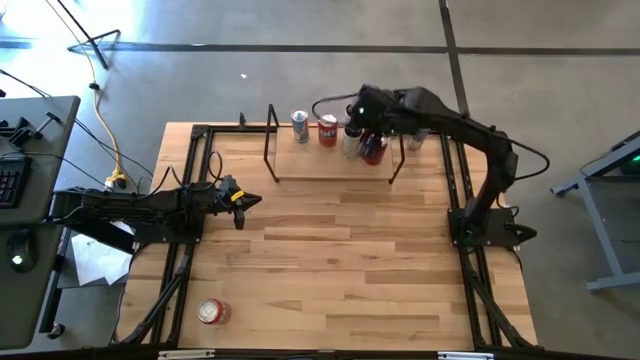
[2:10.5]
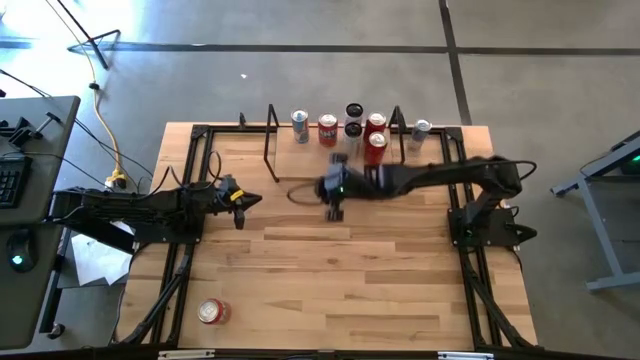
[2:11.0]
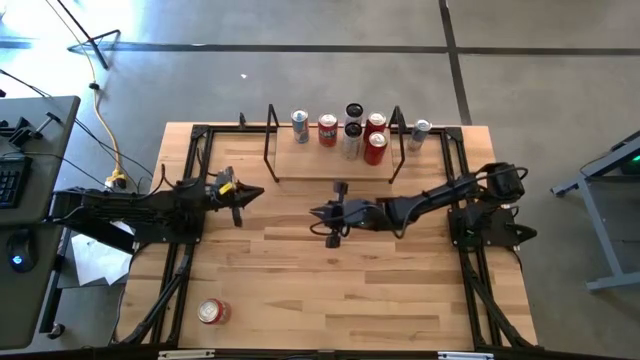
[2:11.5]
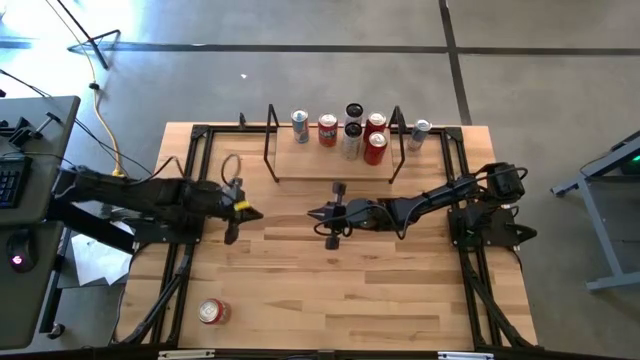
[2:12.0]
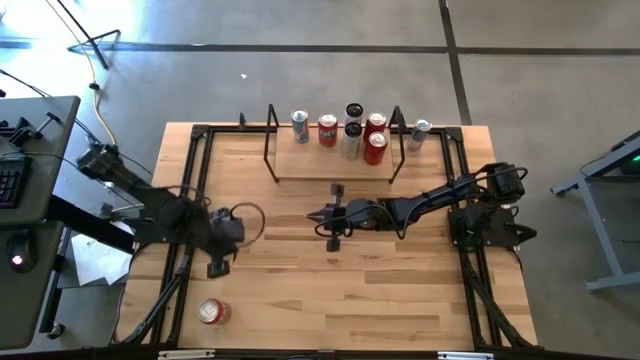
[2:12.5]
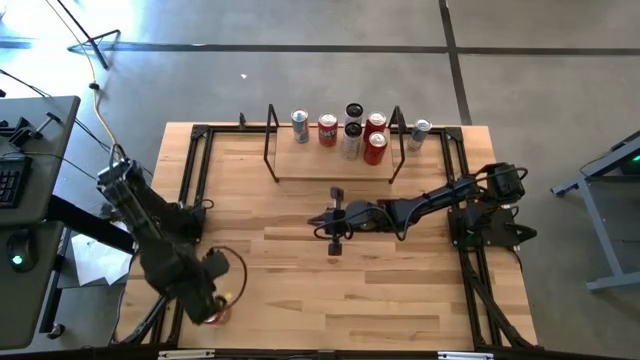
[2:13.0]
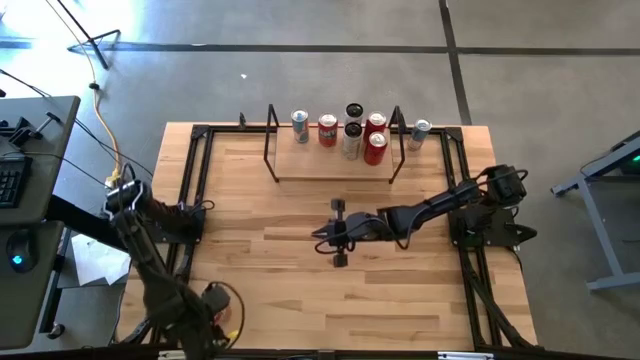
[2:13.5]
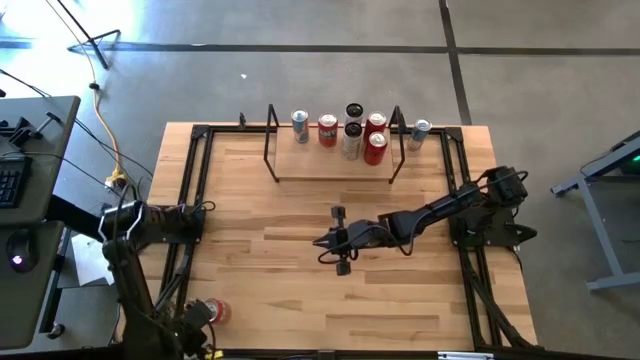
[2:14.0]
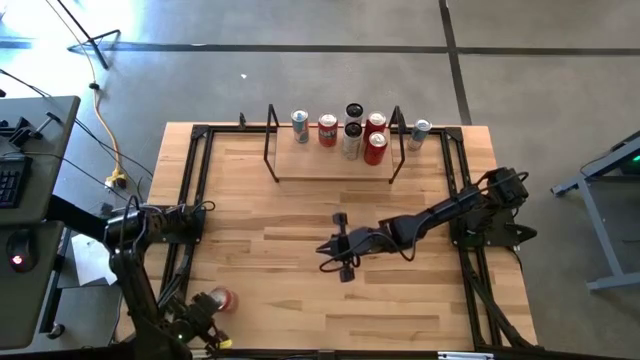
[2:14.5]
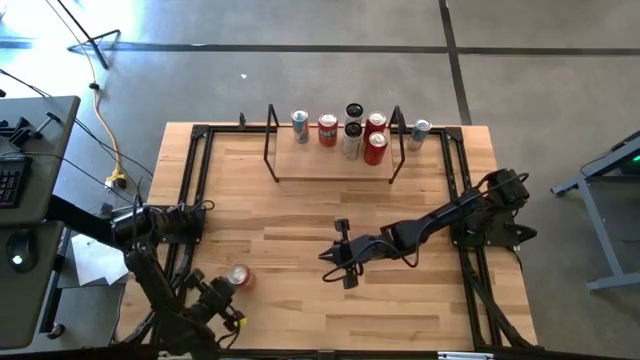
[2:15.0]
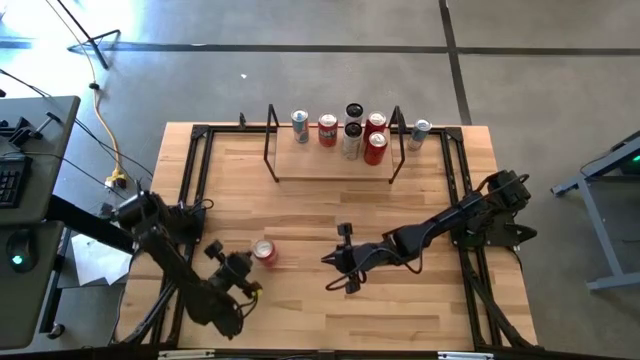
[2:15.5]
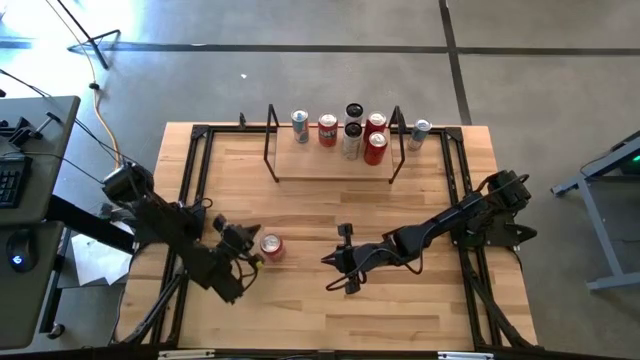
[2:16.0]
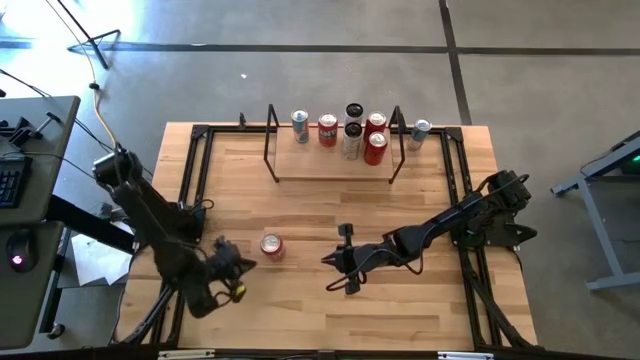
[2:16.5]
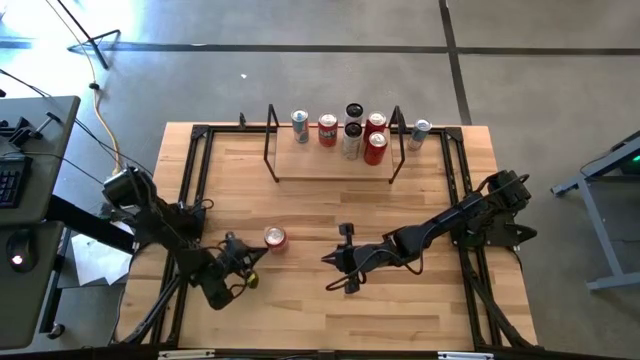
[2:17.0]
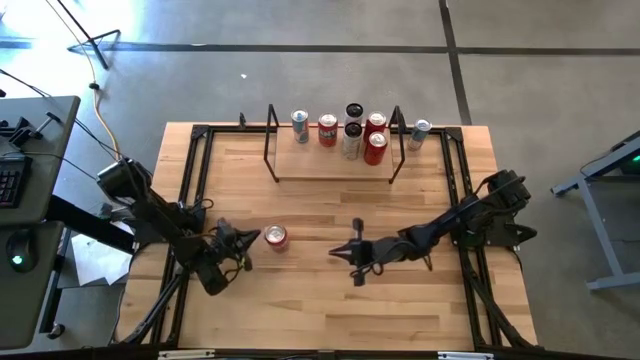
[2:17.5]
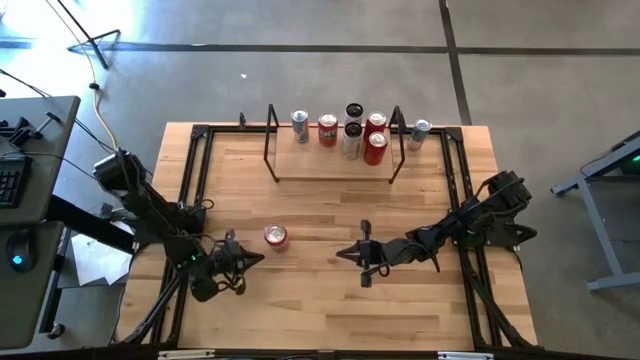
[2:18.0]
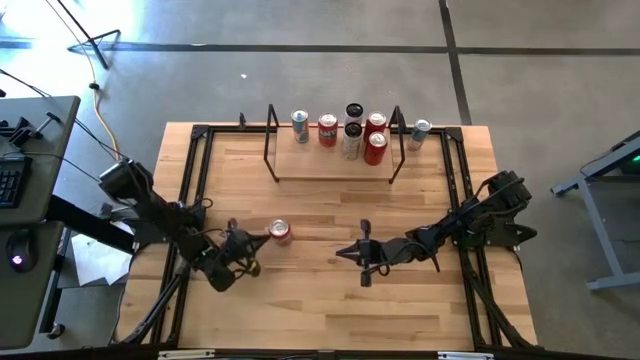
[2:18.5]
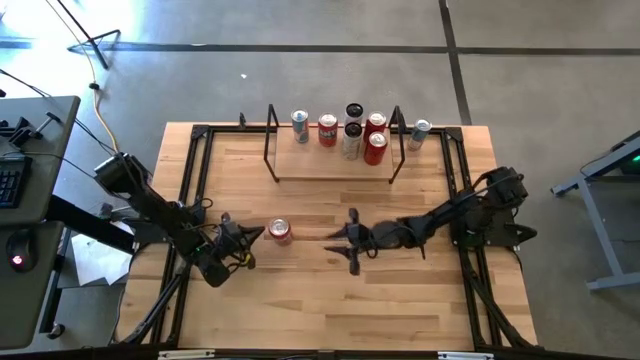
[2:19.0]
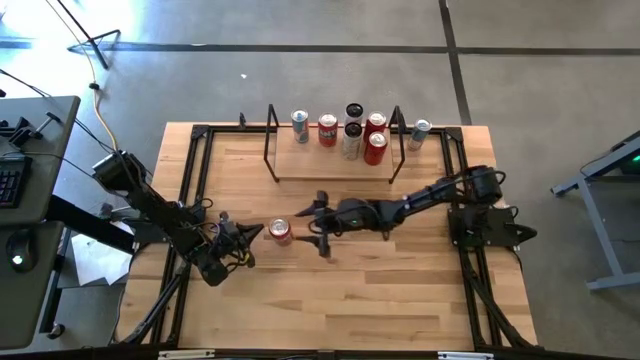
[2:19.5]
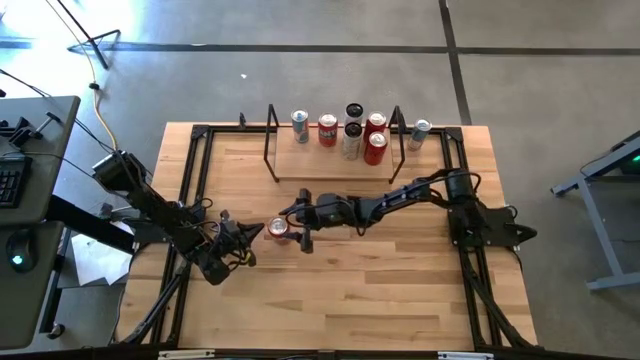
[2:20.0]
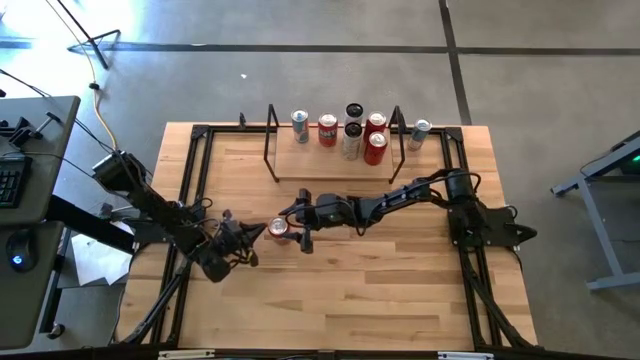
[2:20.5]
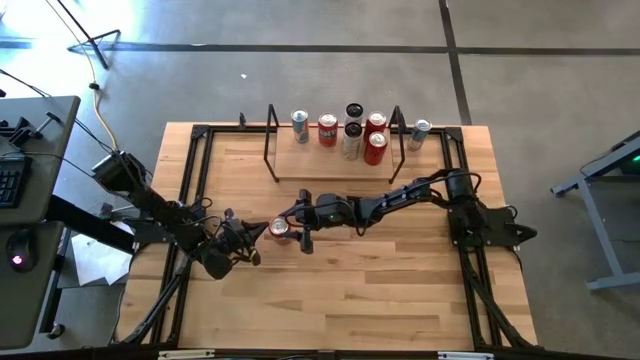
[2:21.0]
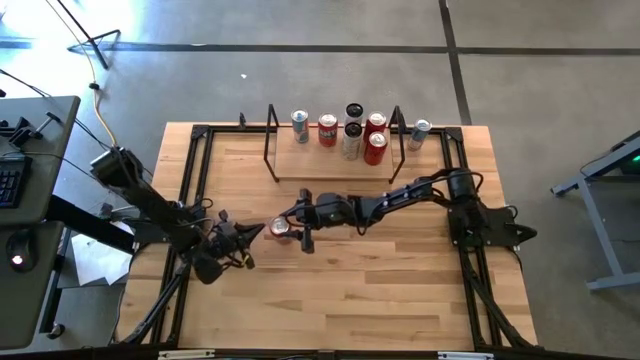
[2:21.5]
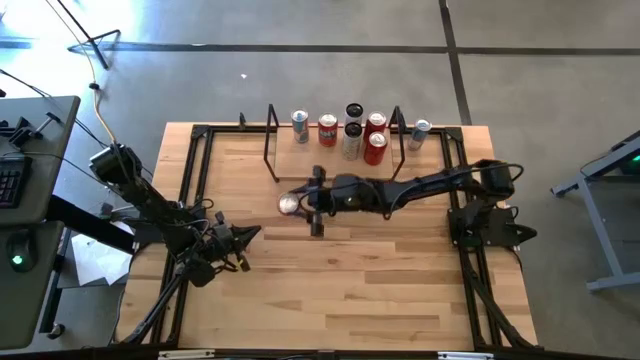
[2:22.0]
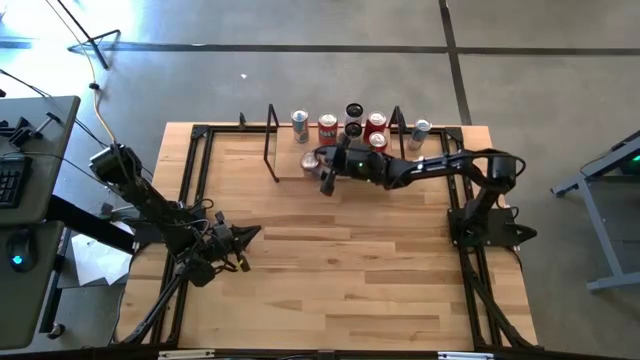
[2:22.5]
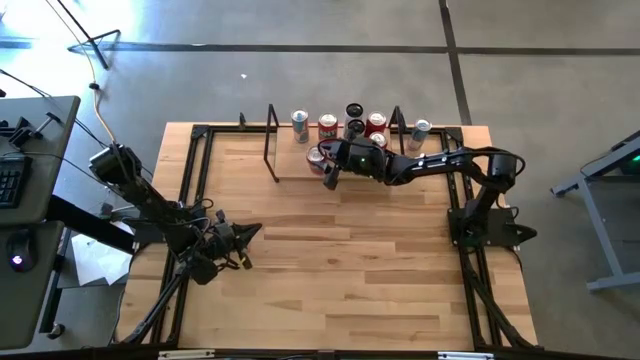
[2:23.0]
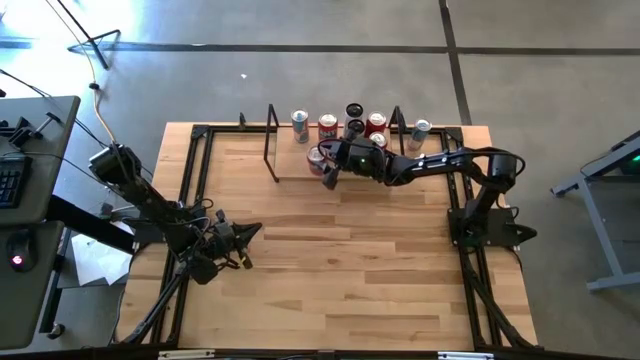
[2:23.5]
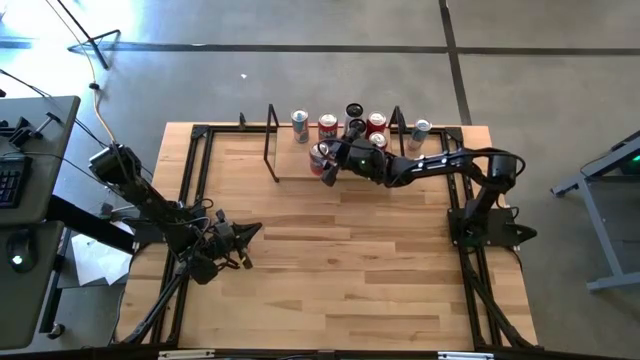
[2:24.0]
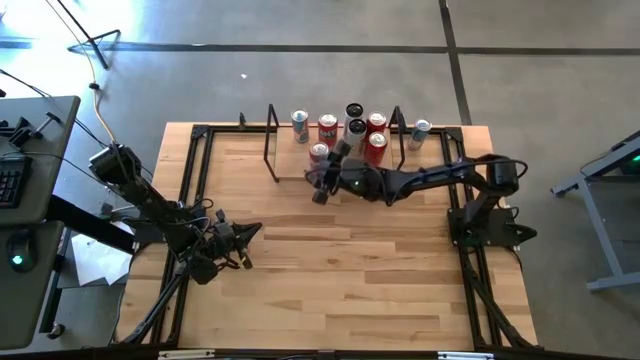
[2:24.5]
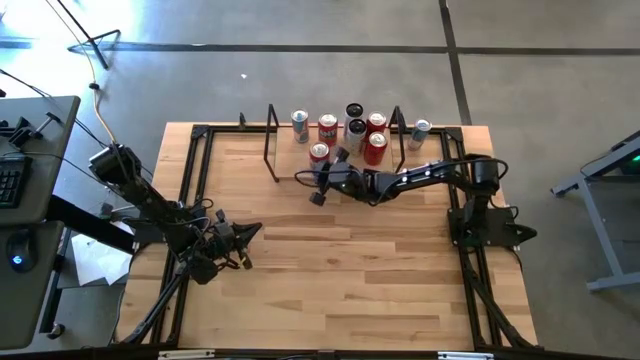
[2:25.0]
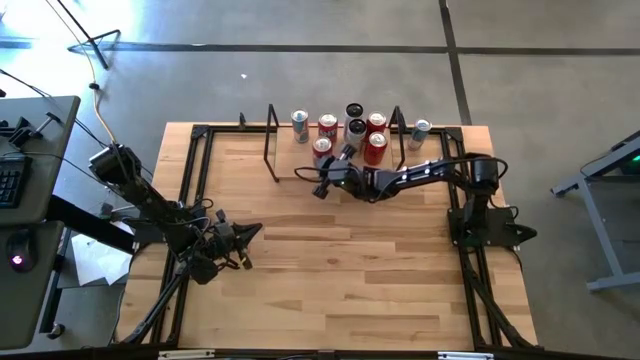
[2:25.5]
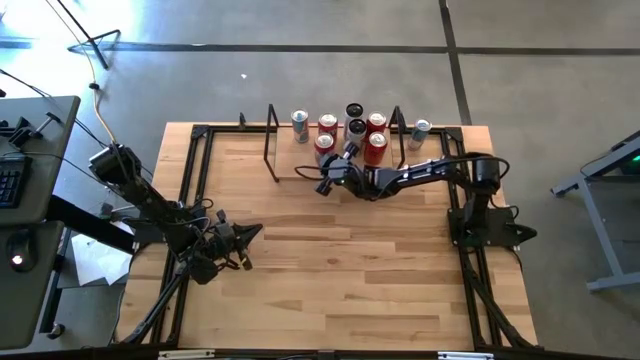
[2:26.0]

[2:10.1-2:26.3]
Task: Place canned beverage on shelf
Put the red soda can on the shelf aligned with the other red soda can

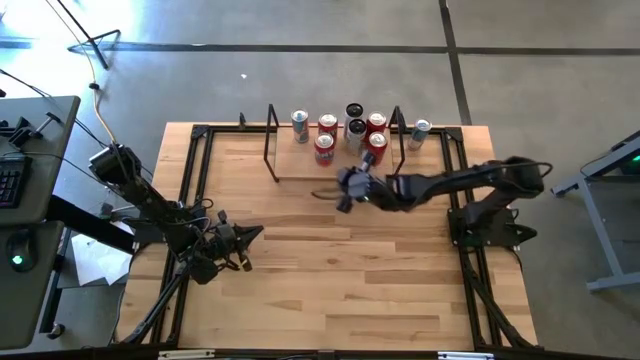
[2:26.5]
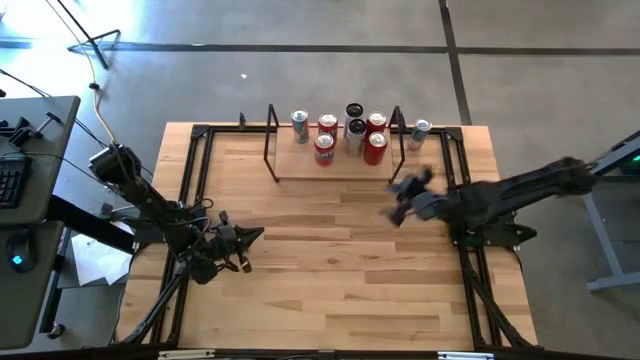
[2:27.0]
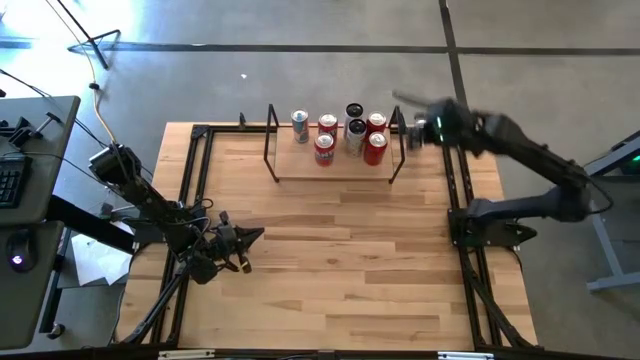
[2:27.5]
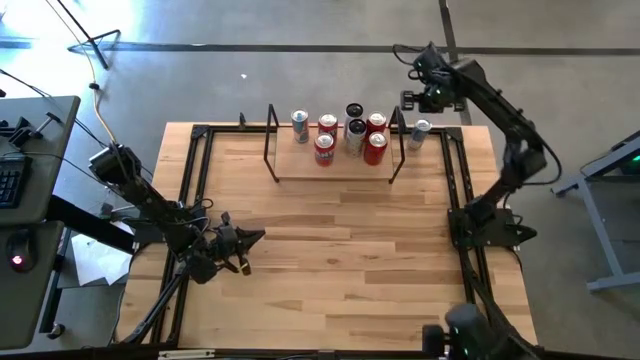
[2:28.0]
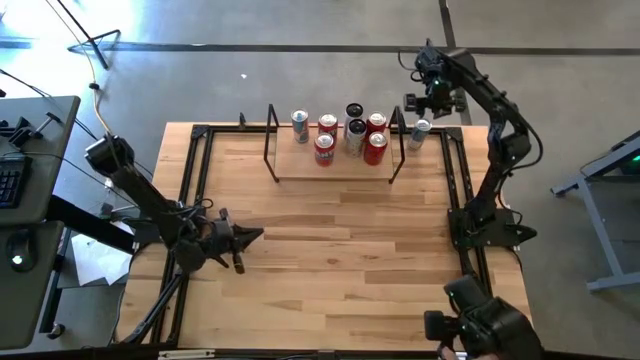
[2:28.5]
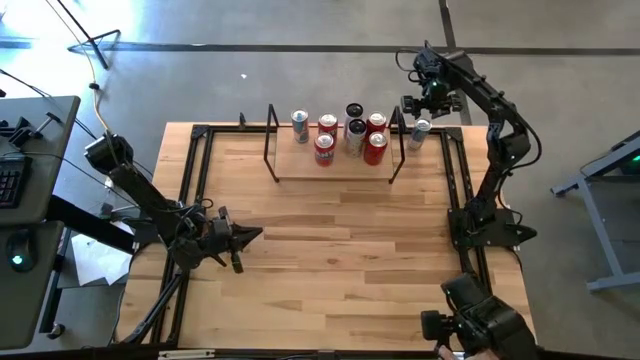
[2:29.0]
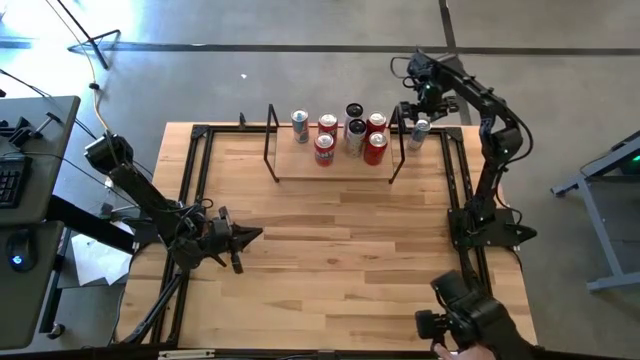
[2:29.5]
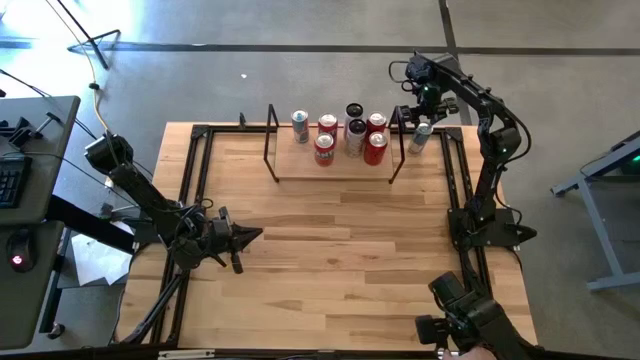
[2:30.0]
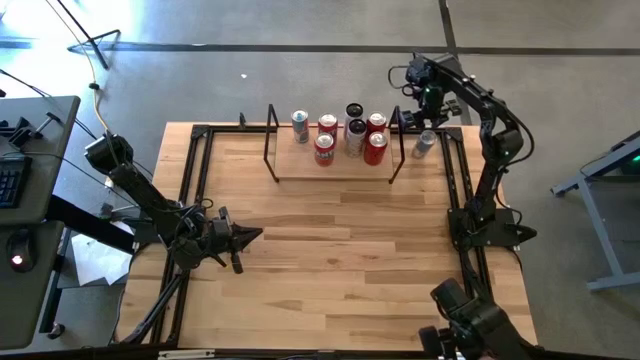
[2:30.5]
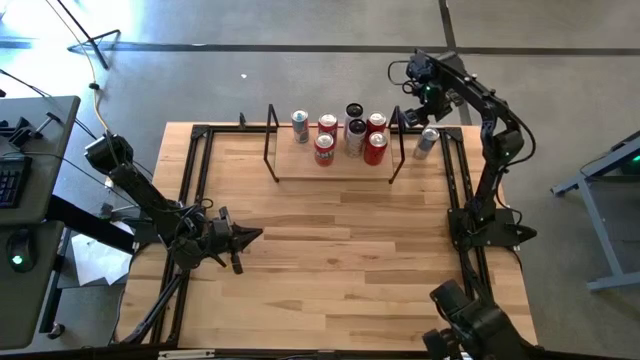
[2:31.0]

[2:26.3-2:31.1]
Put the blue soda can on the shelf aligned with the other blue soda can
